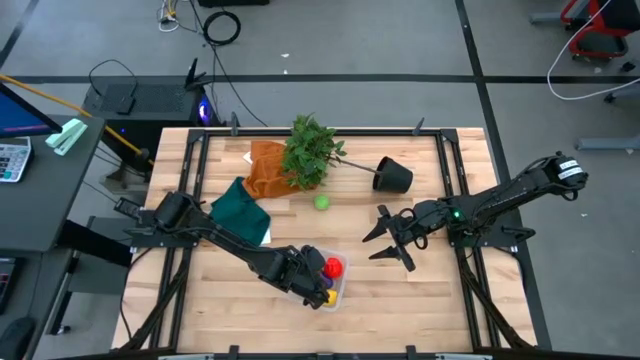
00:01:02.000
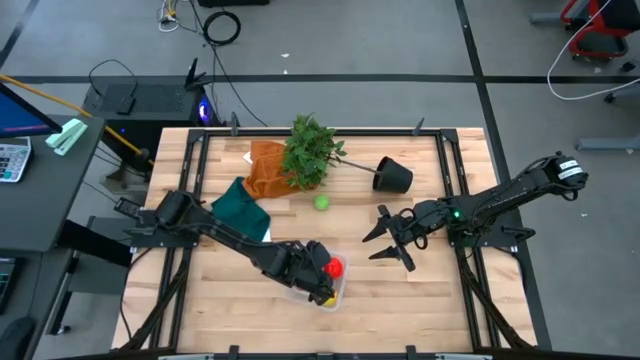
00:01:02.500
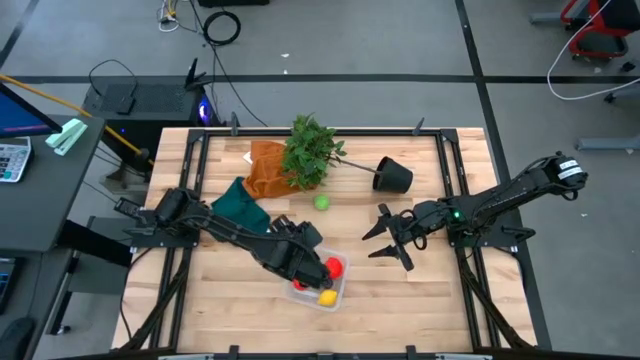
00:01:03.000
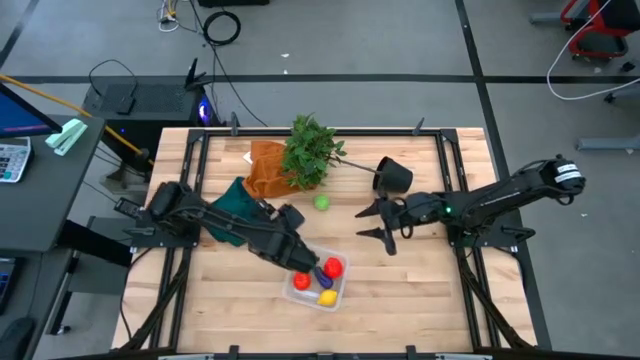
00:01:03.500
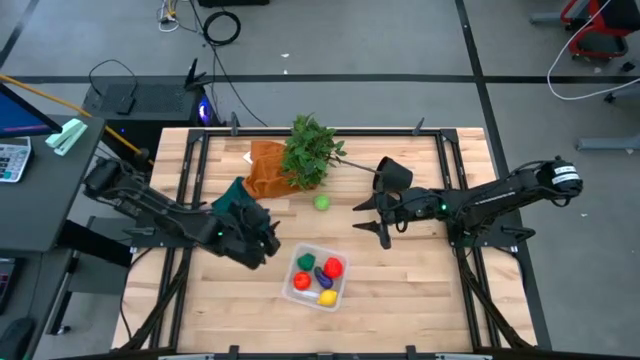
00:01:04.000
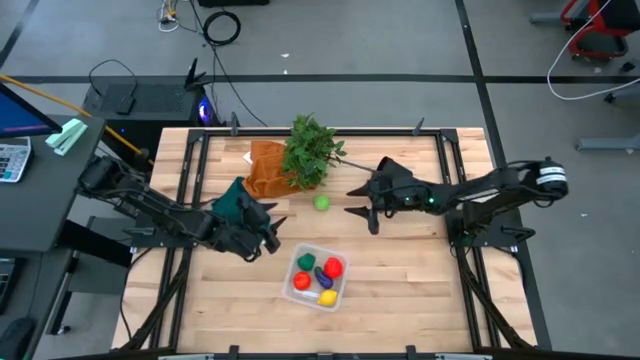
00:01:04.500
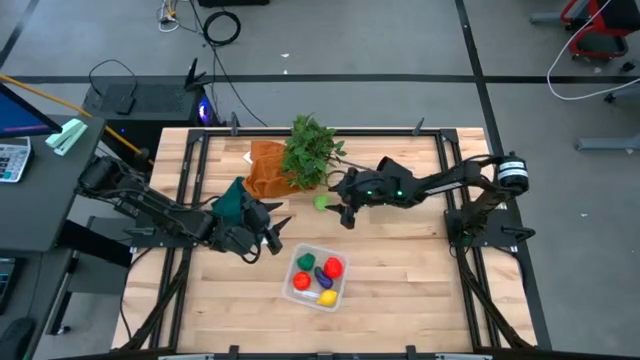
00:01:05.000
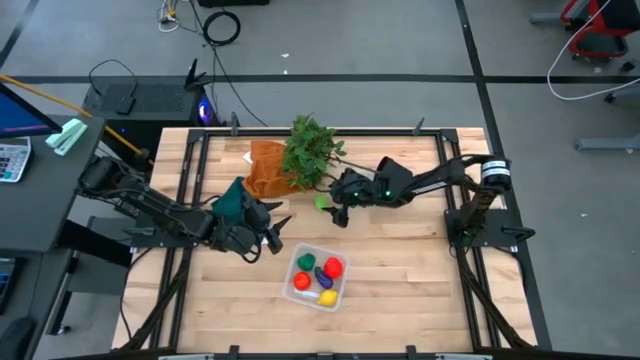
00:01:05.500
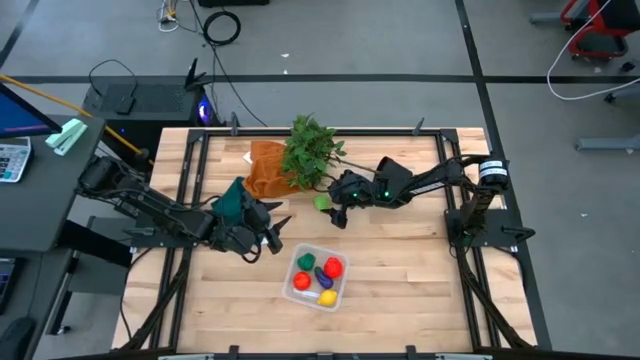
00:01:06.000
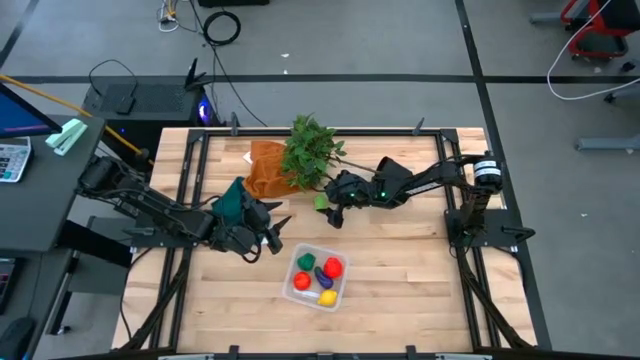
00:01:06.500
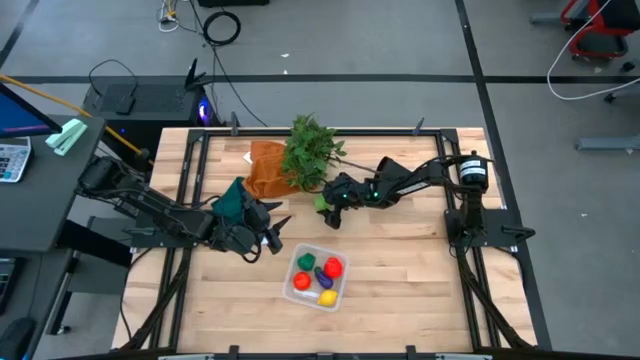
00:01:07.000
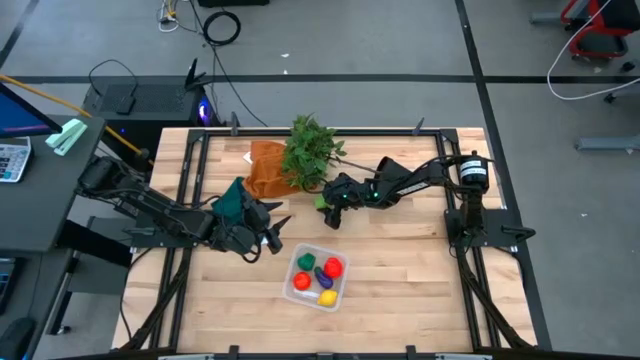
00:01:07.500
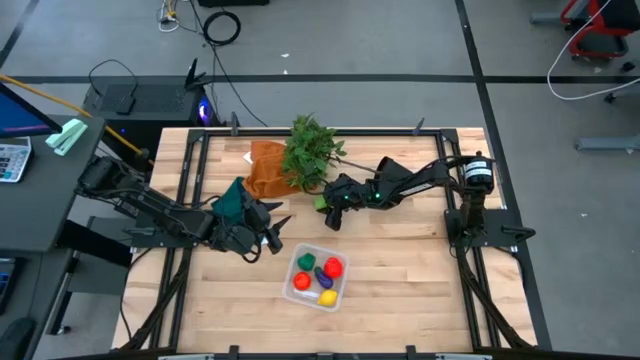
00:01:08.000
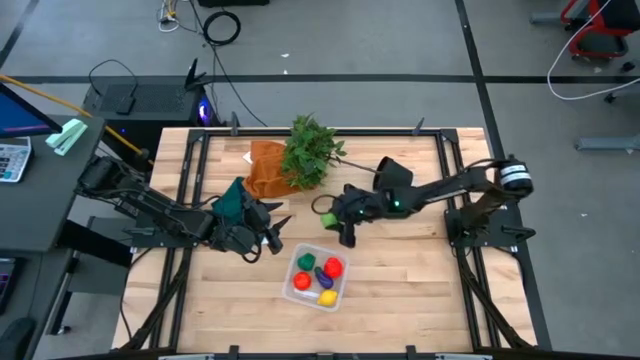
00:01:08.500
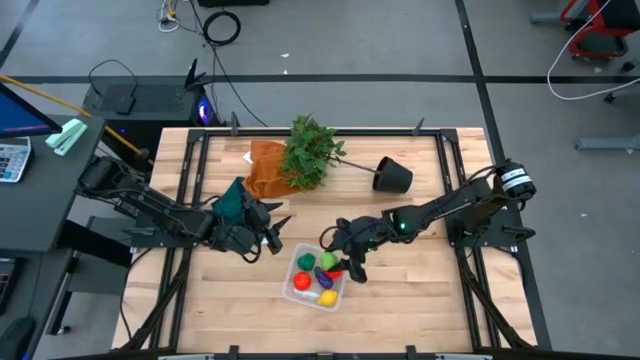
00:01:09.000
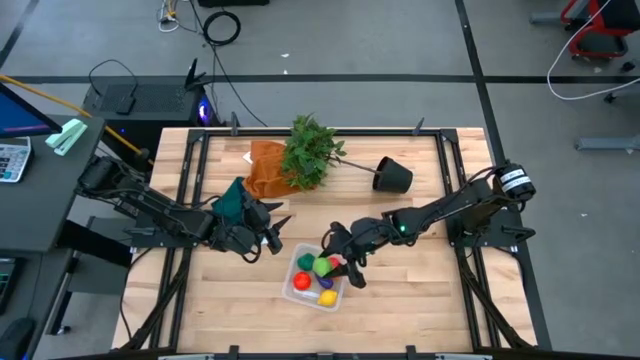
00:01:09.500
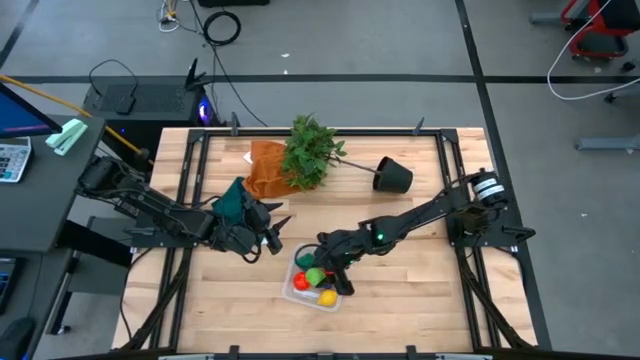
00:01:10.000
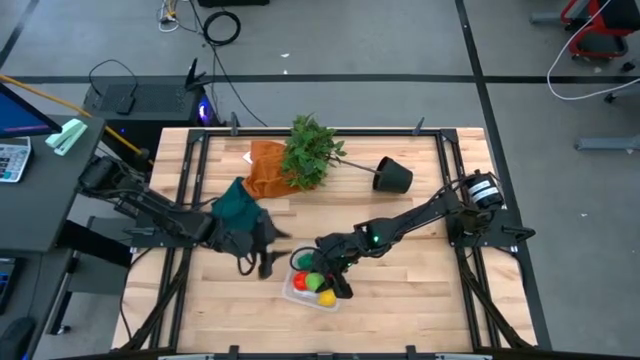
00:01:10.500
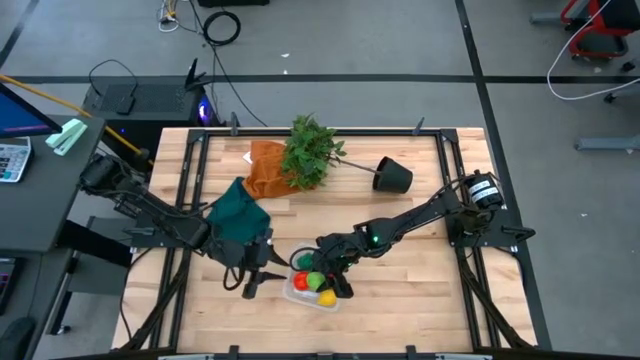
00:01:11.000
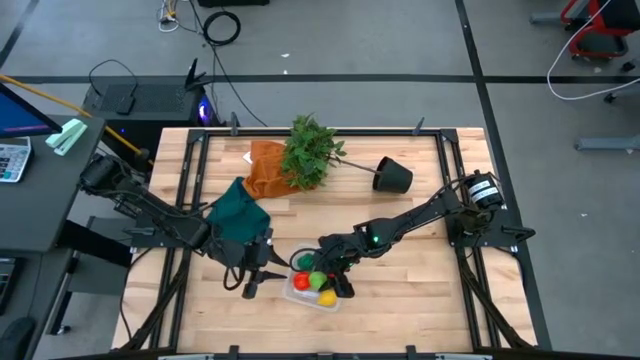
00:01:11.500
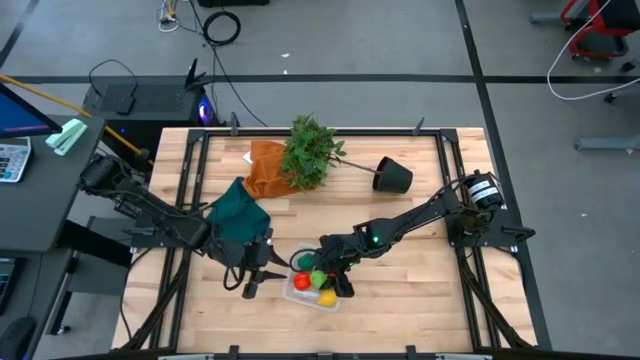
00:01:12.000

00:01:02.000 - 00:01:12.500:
Task: Pick and placing Produce into tupperware
Put the green cabbage into the transparent bin

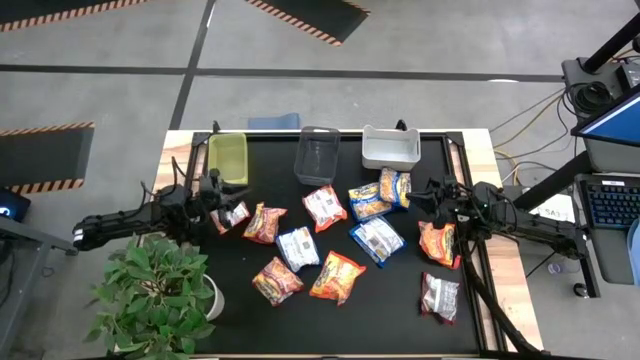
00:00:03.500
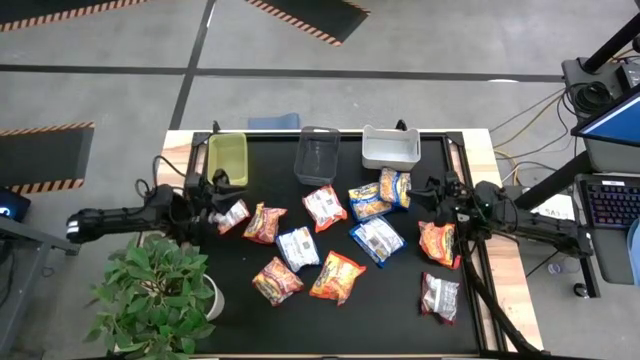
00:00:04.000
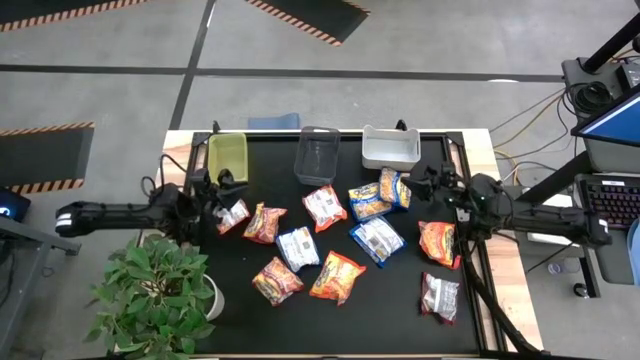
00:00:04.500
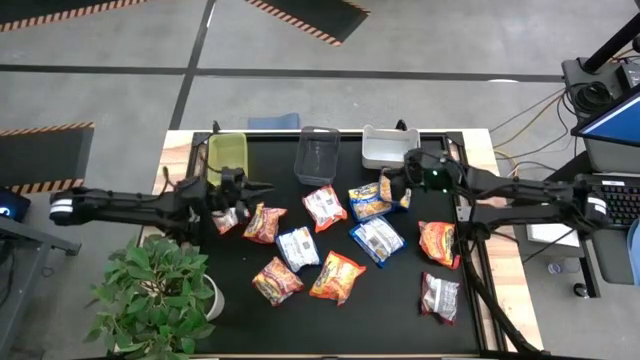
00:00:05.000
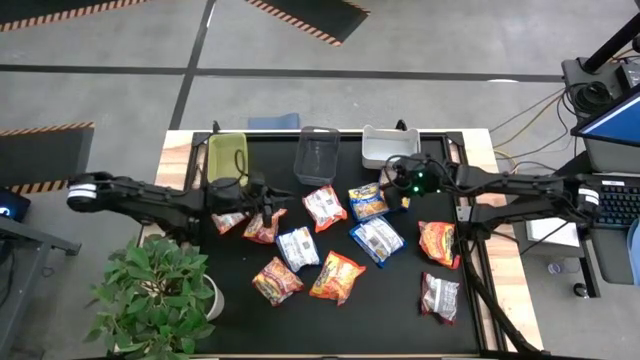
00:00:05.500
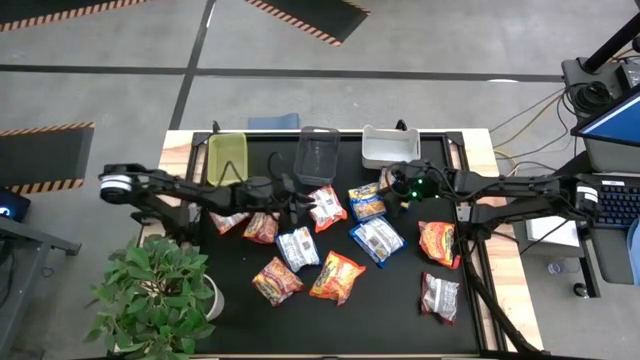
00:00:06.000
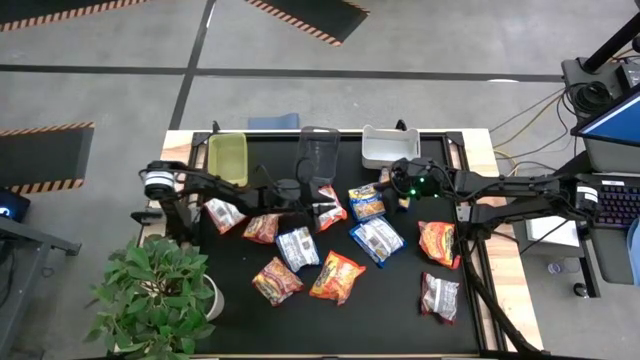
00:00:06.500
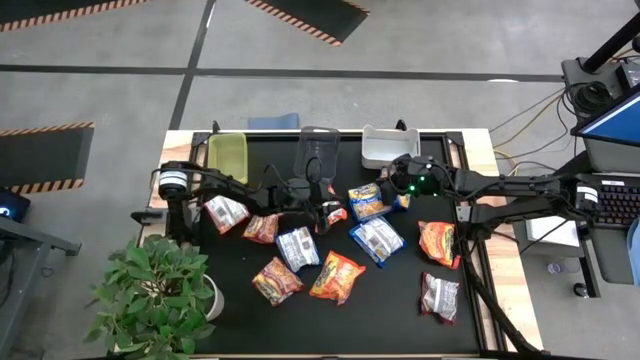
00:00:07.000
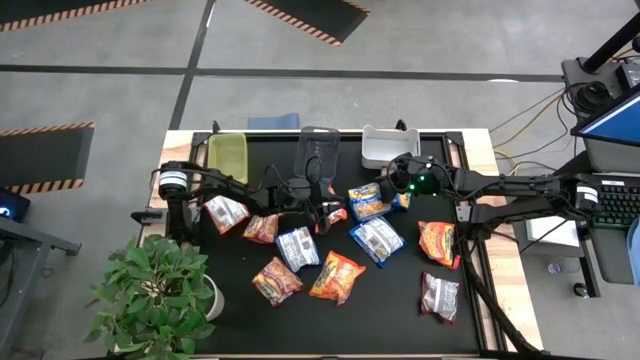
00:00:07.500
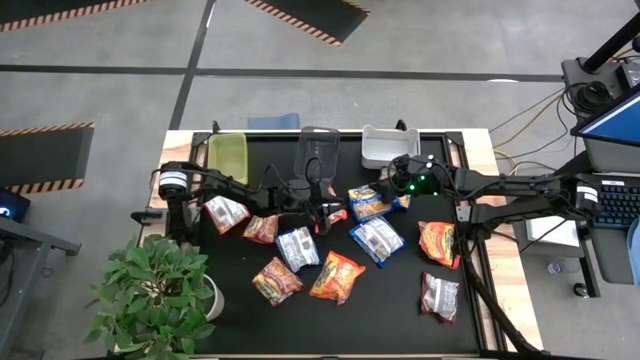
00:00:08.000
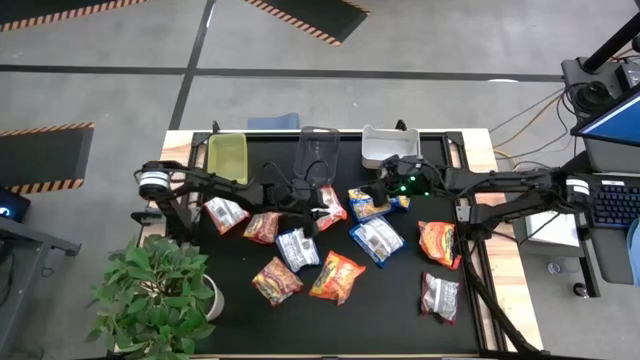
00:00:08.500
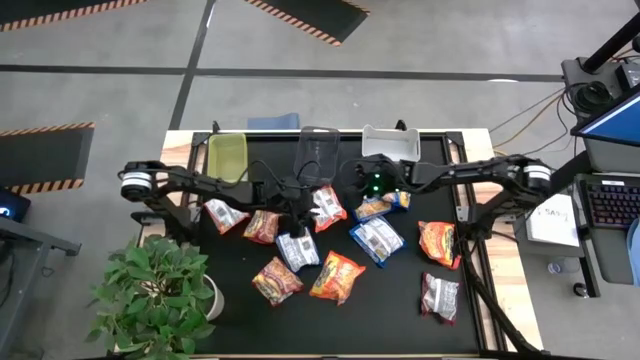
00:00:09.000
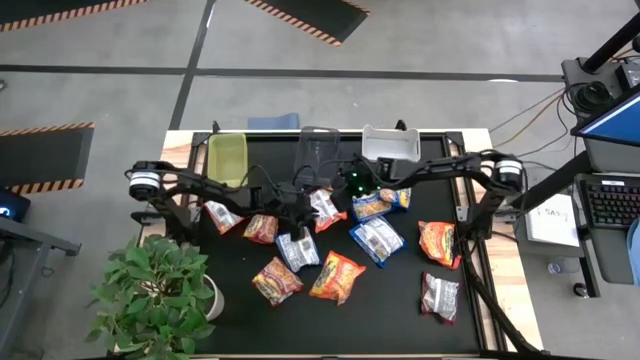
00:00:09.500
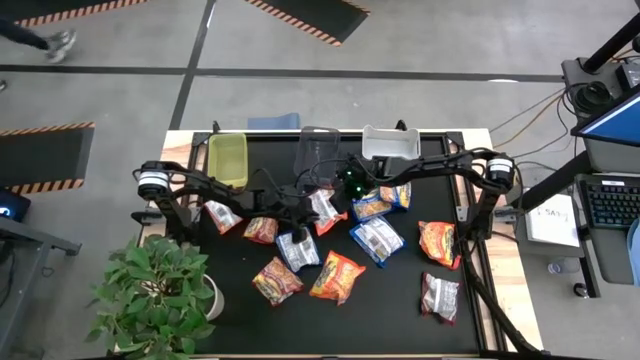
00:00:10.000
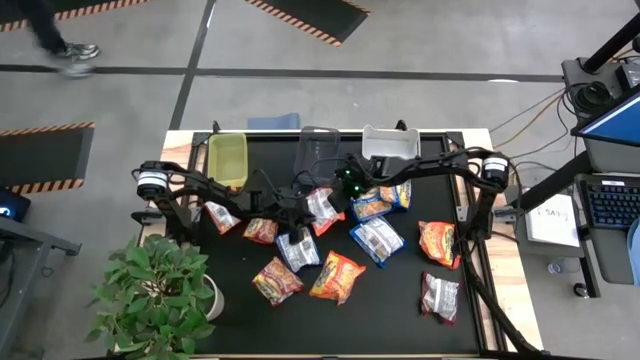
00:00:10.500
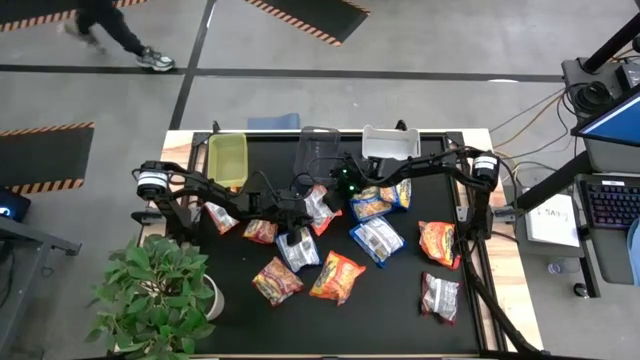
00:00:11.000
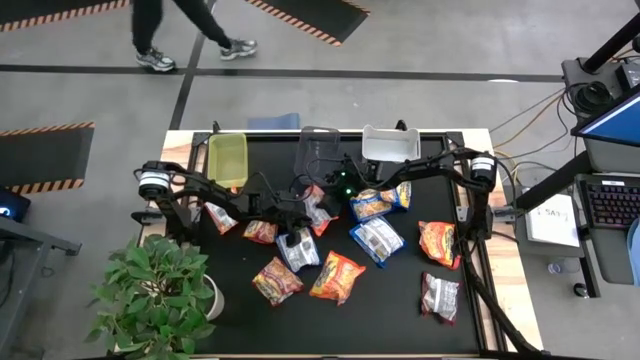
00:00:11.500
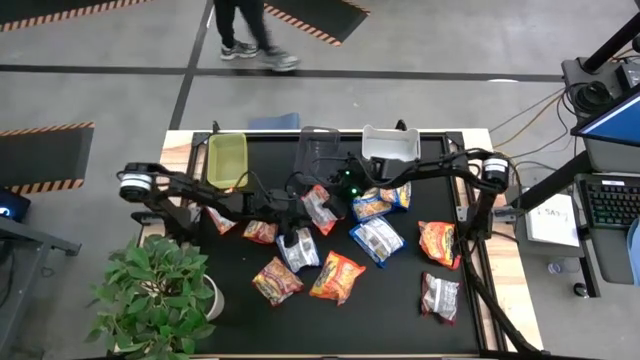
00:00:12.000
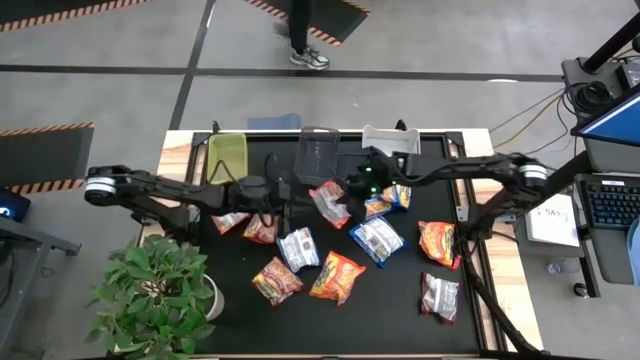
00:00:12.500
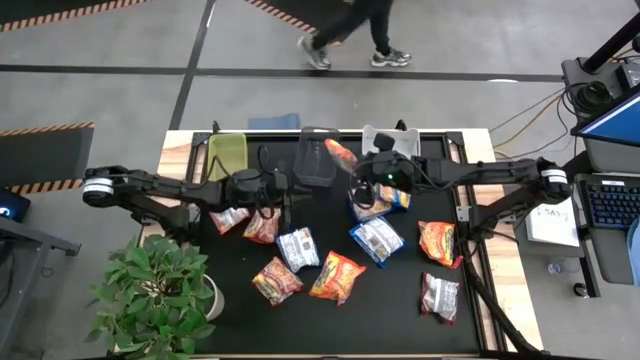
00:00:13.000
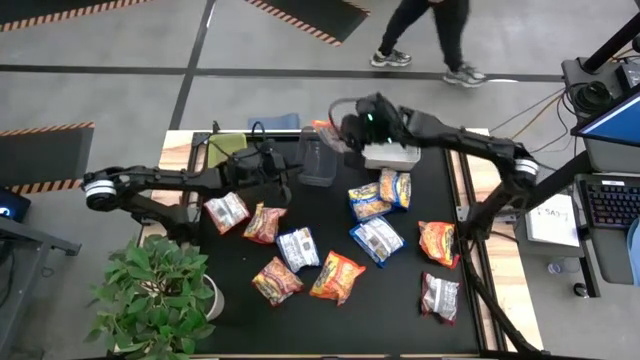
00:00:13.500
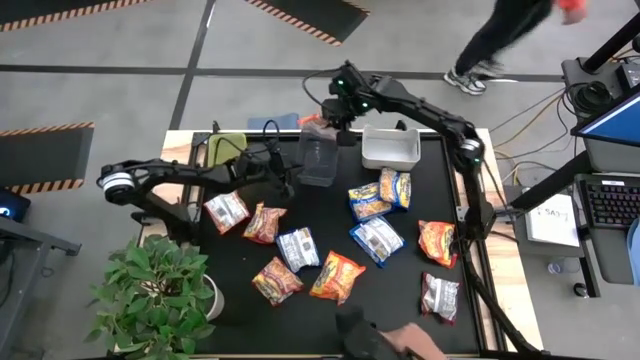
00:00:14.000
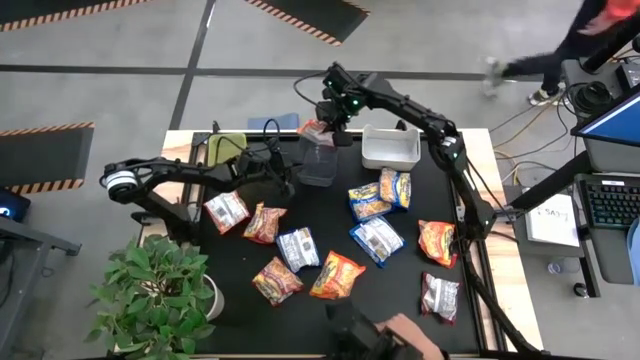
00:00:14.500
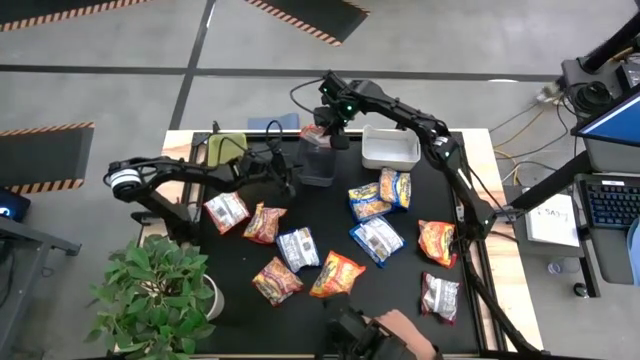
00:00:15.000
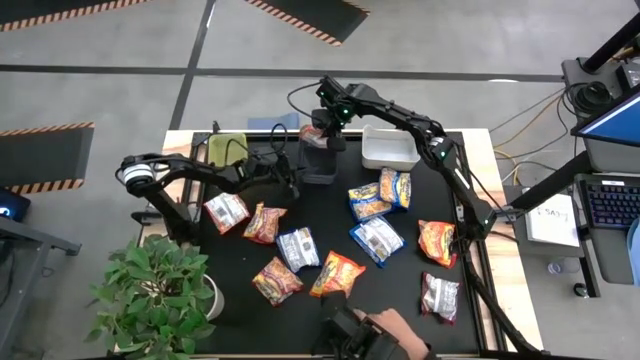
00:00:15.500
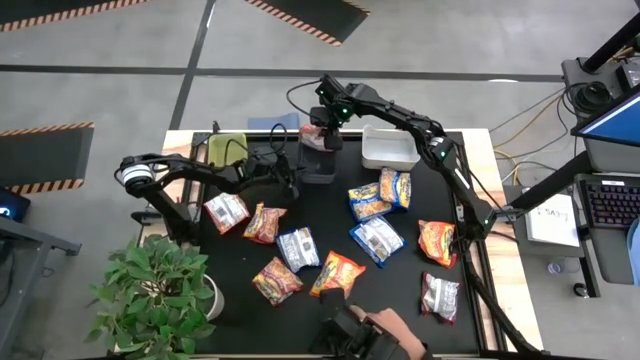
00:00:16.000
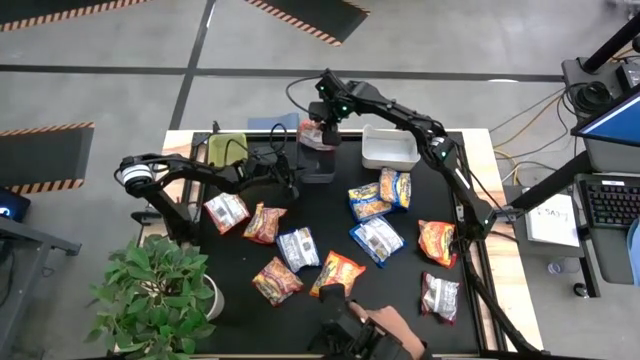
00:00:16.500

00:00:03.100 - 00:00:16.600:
Task: Sort Maruchan noodles
Put the orange noodle pack into the black bin
